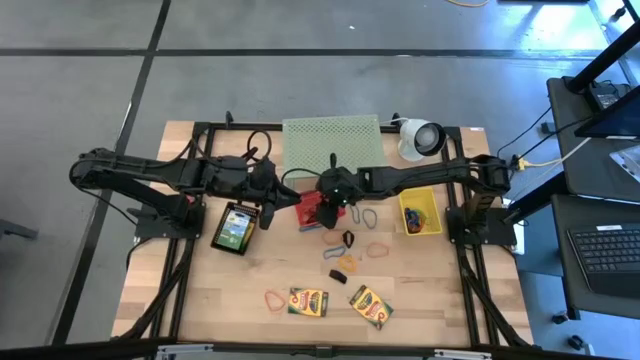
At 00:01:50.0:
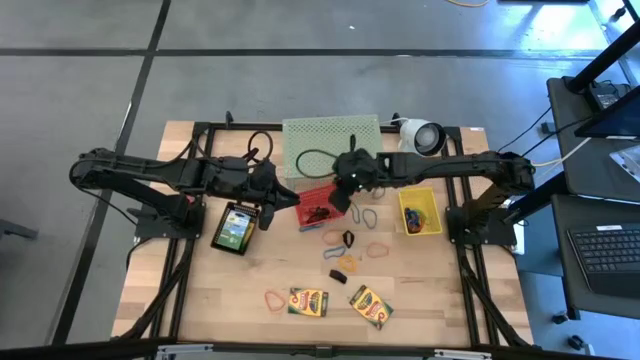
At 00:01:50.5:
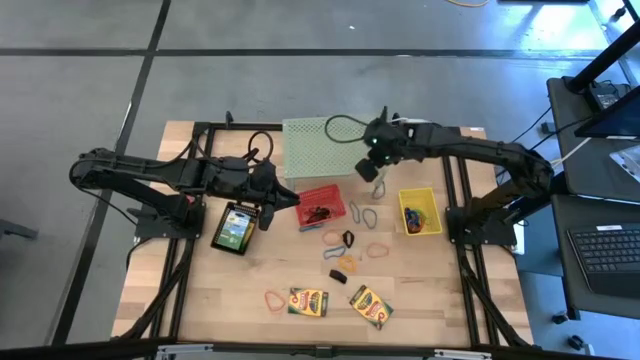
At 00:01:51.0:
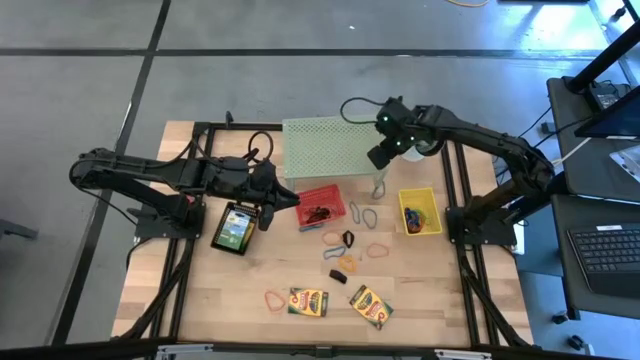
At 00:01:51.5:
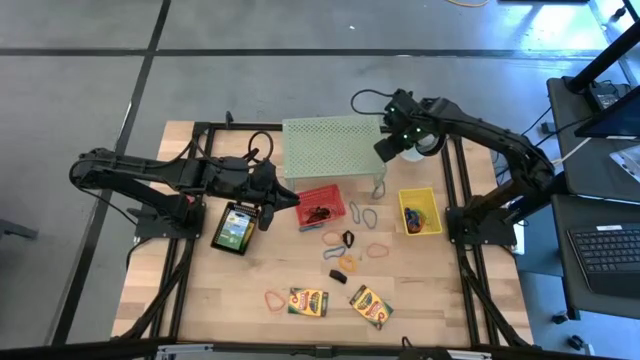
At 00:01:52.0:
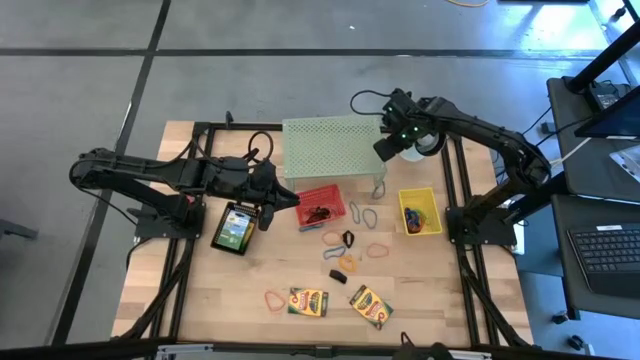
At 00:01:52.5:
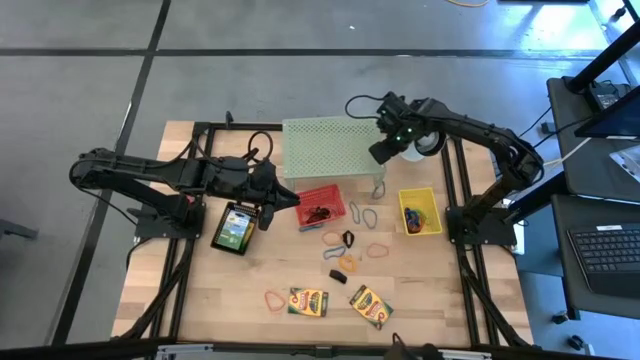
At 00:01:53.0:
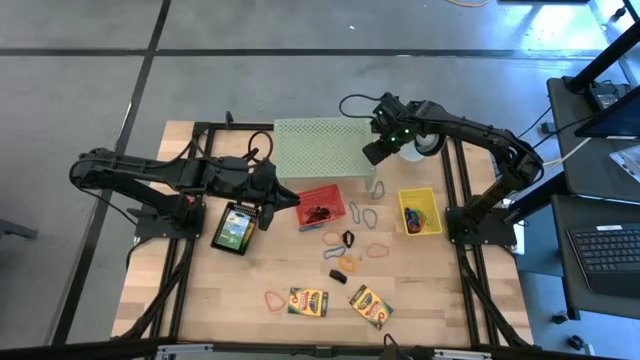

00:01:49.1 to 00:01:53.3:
Task: Pick & Place Office Desk Supplies
Adjust the shelf

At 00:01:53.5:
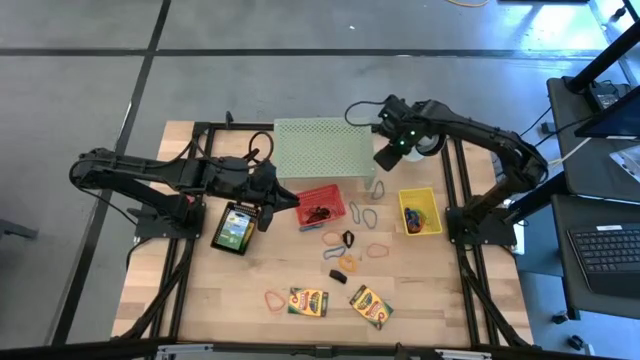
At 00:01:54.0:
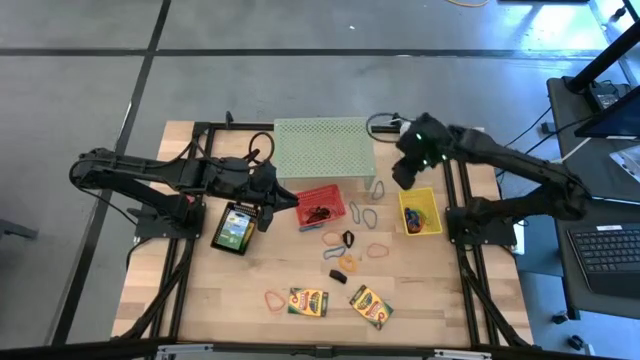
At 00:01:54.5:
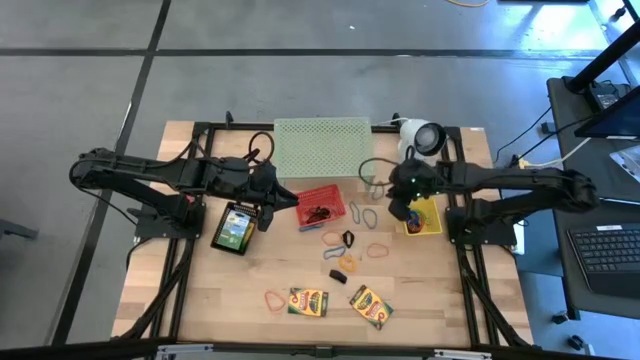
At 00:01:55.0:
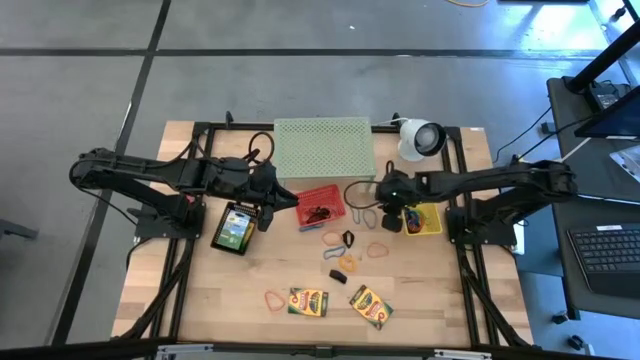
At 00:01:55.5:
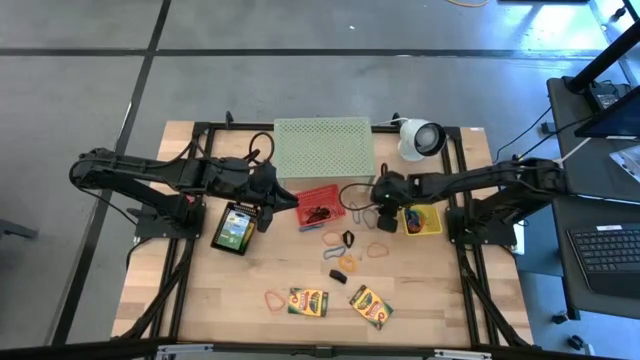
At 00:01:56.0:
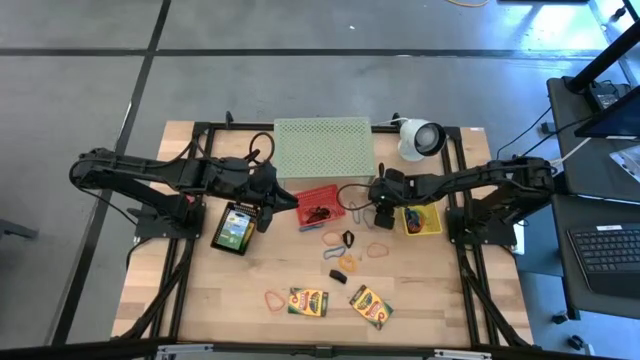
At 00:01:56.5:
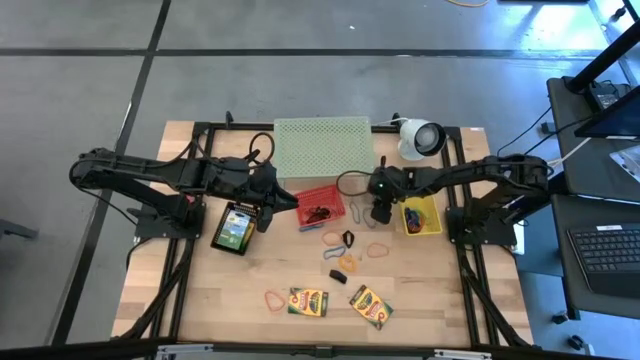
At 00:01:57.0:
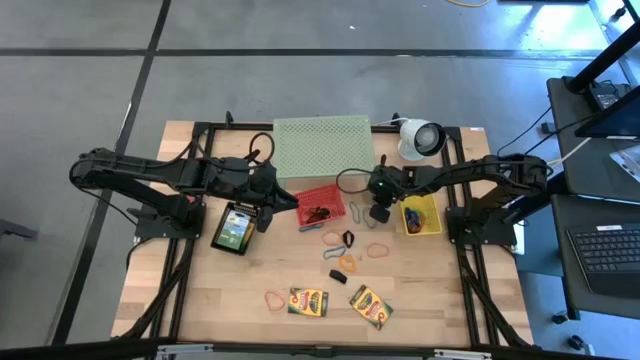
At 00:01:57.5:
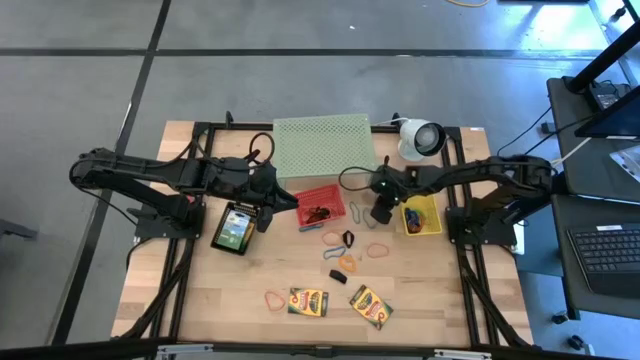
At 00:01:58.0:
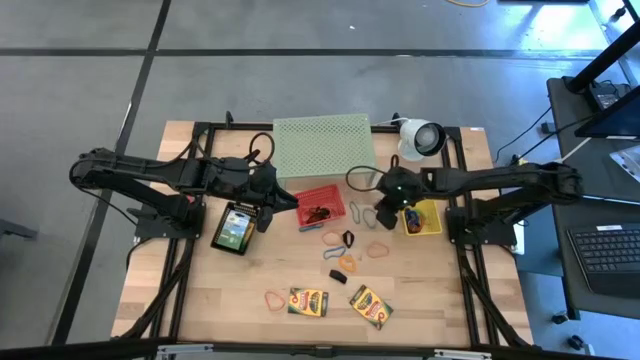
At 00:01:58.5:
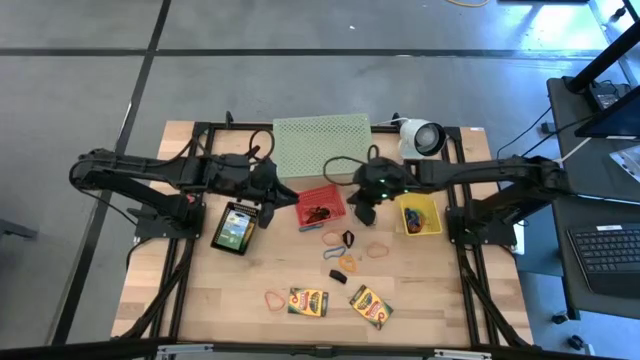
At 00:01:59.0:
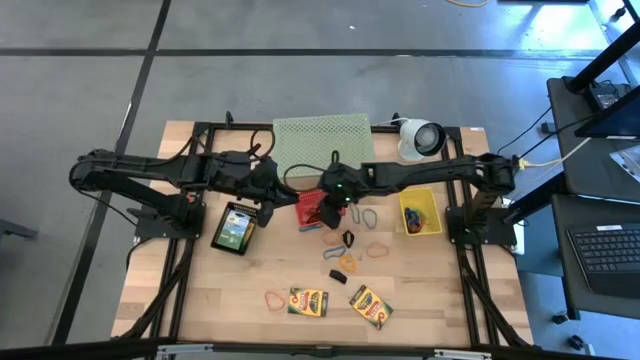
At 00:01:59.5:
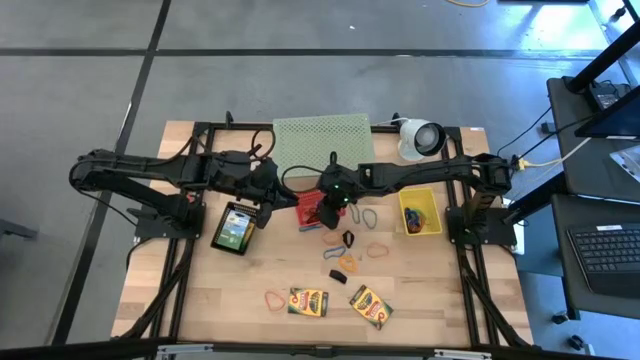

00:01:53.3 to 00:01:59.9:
Put the blue rubber band into the red bin

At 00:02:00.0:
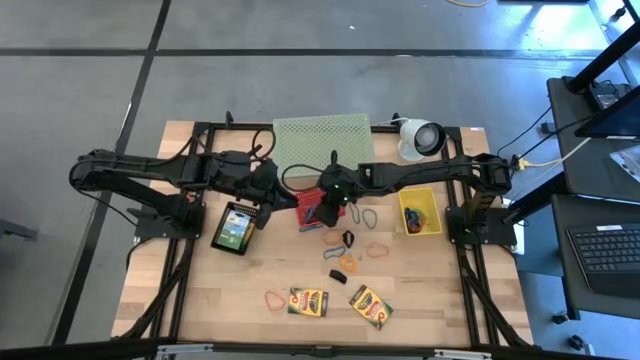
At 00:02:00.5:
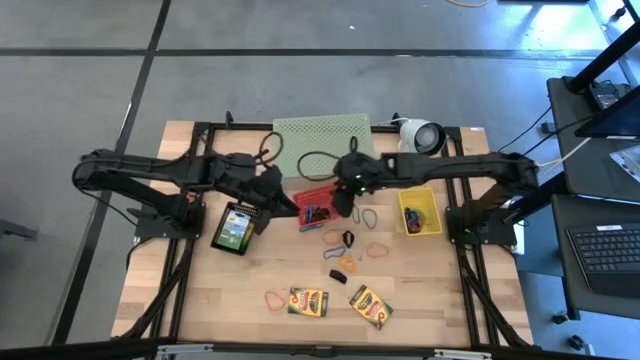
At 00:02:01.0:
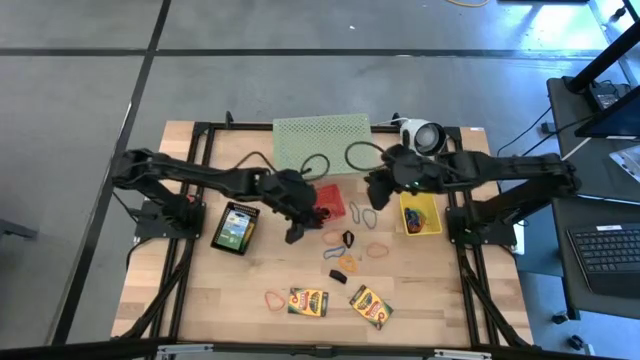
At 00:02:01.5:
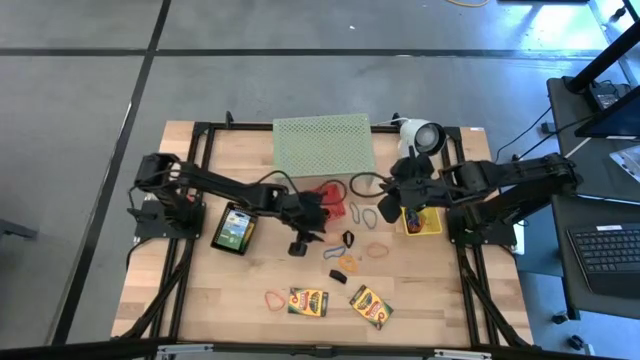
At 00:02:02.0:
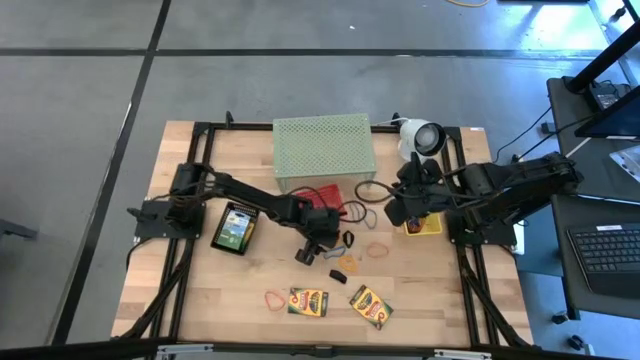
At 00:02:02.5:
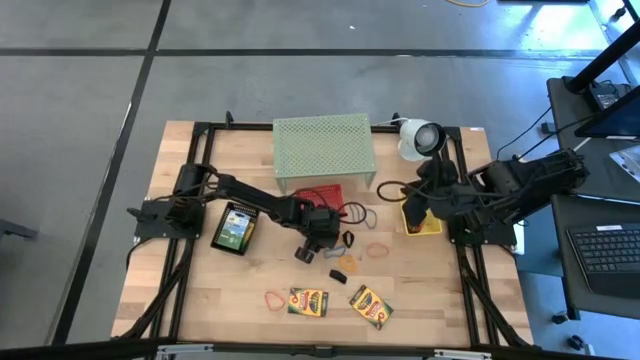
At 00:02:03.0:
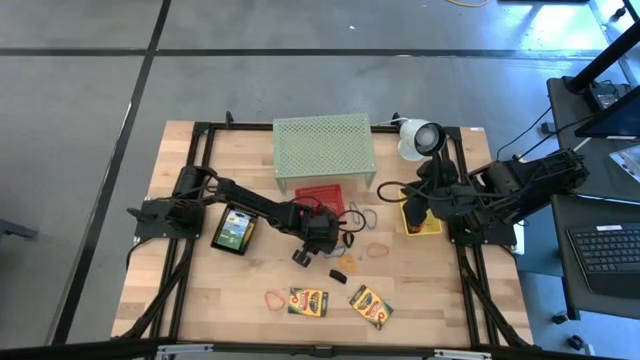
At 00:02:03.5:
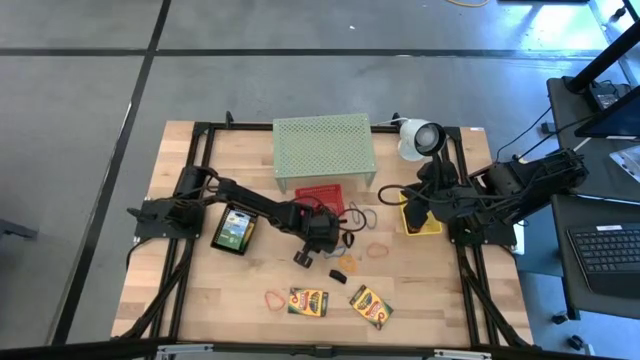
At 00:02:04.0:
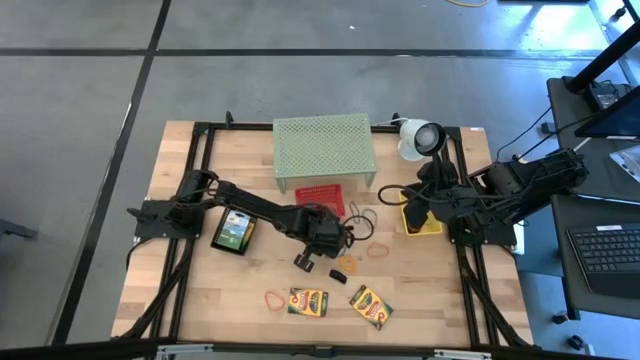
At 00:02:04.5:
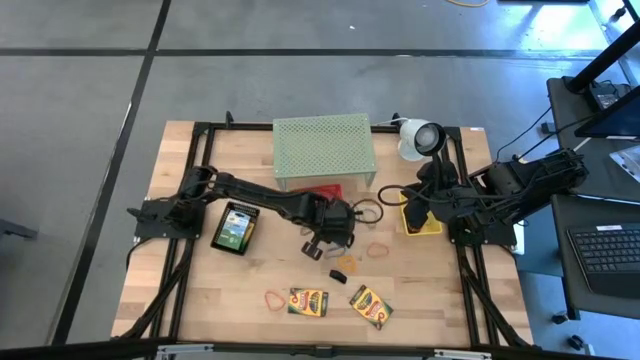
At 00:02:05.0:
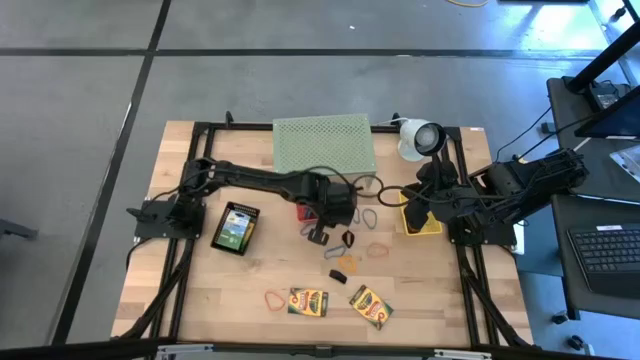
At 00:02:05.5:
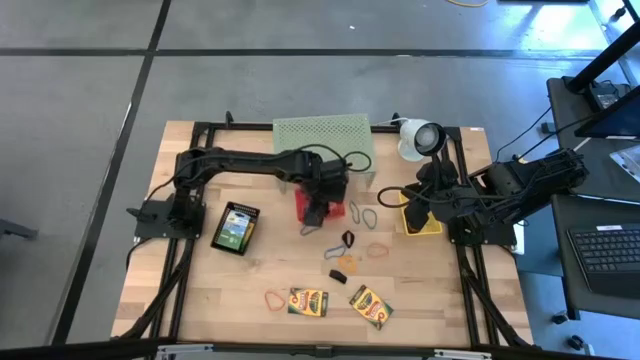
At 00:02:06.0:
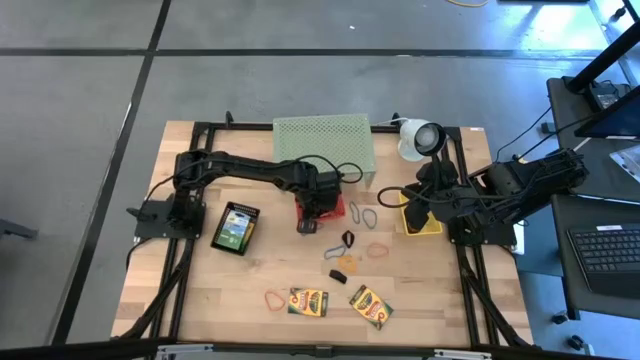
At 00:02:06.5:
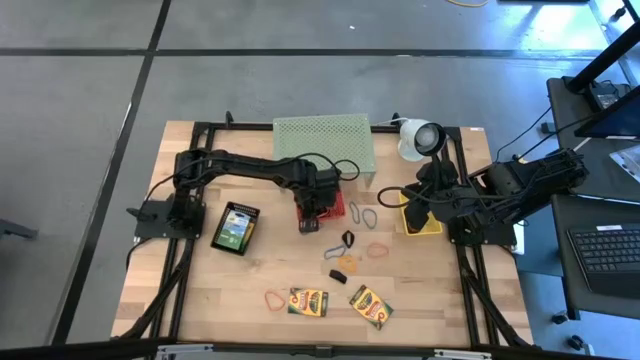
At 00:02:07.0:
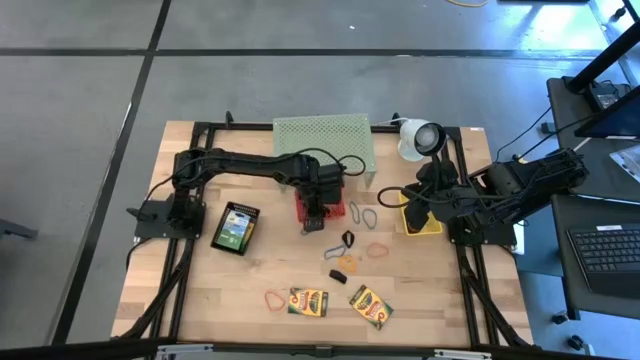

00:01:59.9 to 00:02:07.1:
Put the orange rubber band into the red bin

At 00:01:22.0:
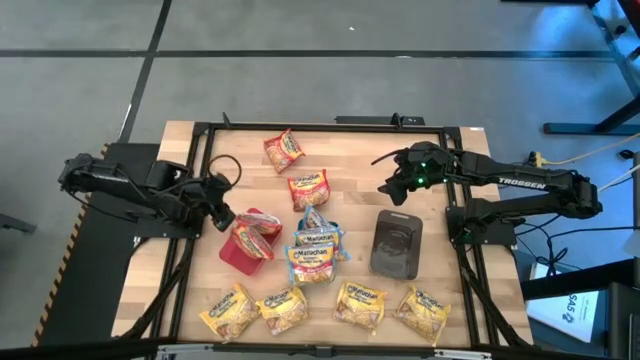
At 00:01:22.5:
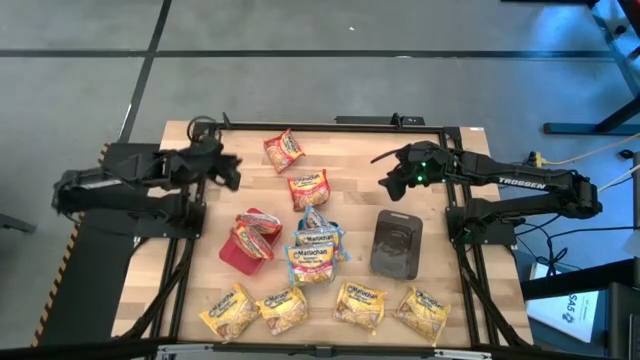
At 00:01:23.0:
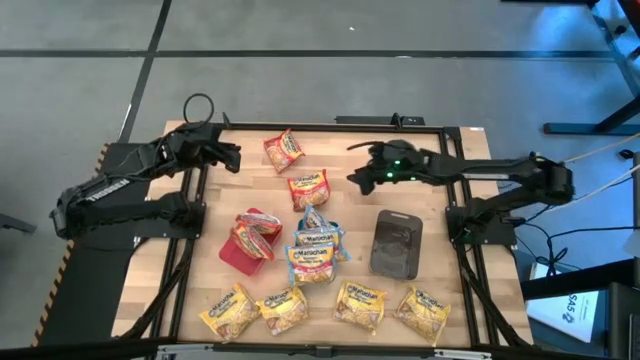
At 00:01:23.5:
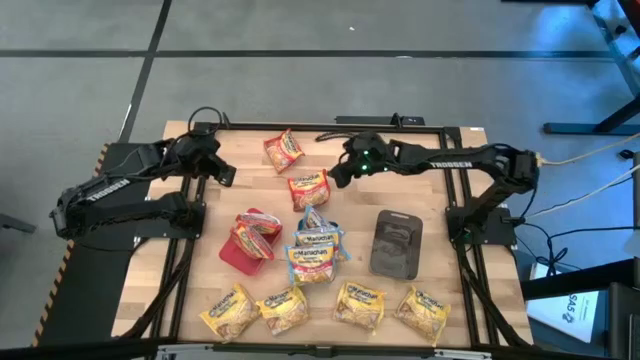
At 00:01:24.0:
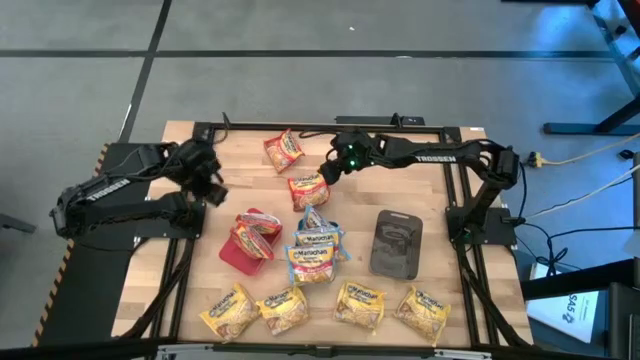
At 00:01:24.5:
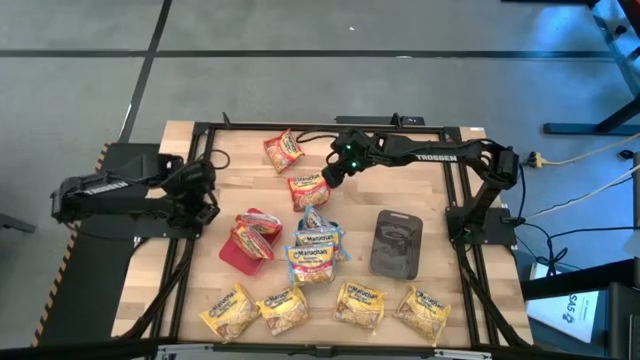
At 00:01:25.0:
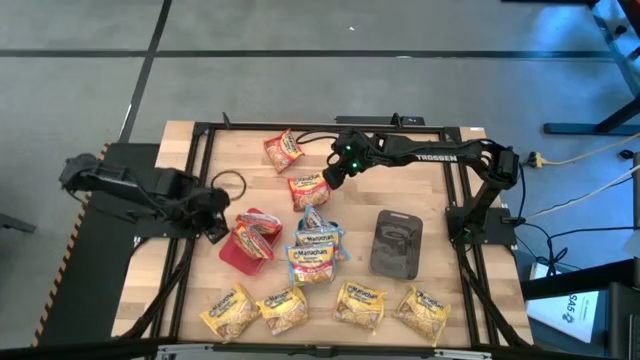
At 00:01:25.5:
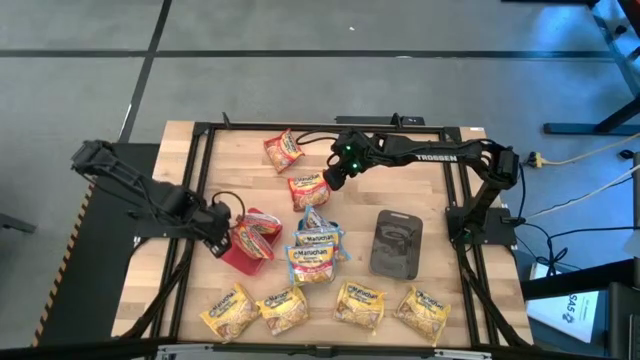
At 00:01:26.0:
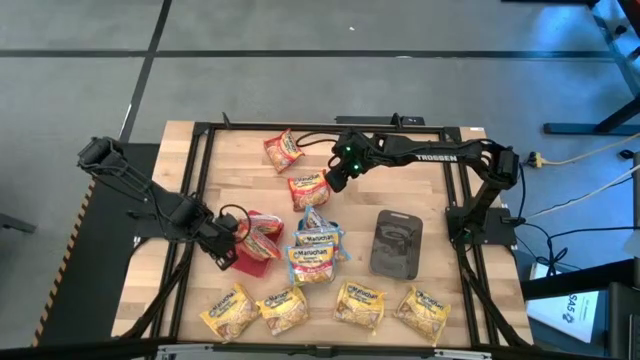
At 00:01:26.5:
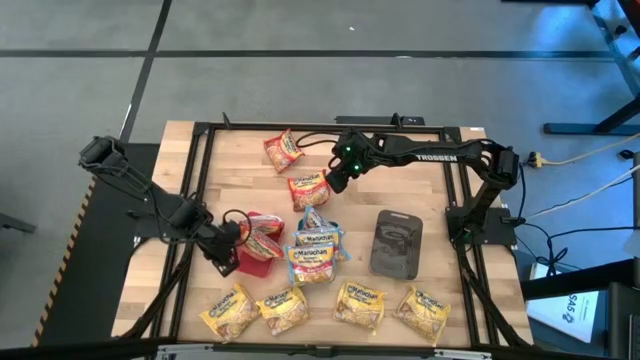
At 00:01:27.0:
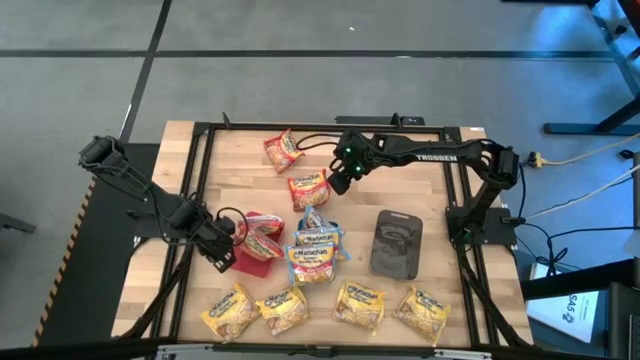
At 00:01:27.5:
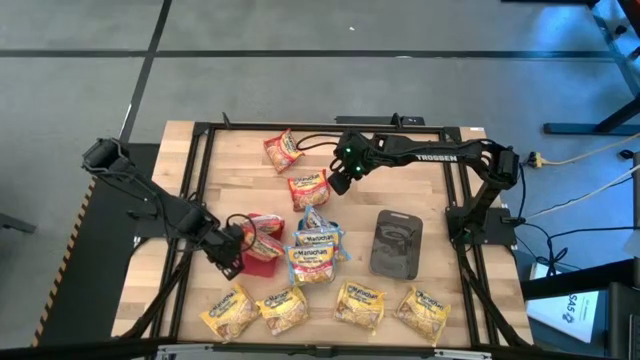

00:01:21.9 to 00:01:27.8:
Task: Sort Maruchan noodles
Adjust the red bin
